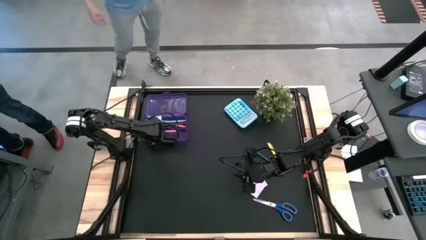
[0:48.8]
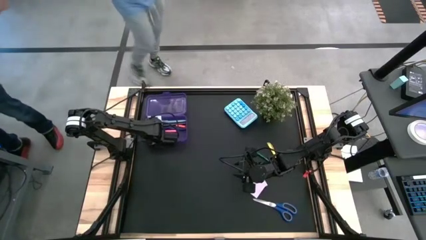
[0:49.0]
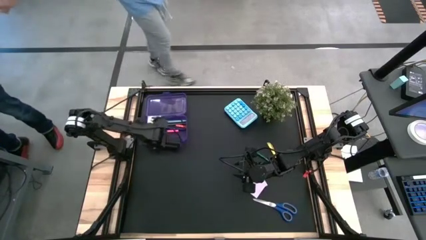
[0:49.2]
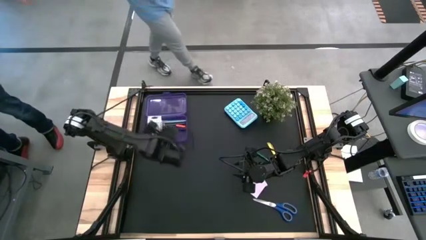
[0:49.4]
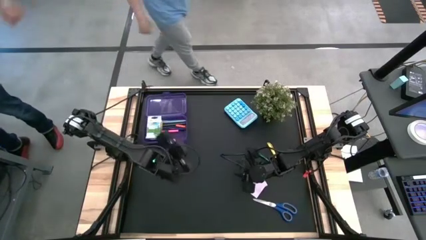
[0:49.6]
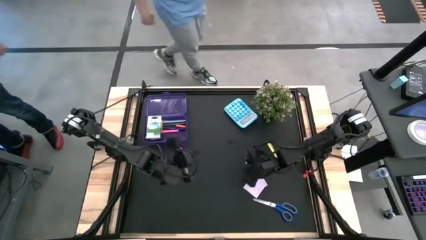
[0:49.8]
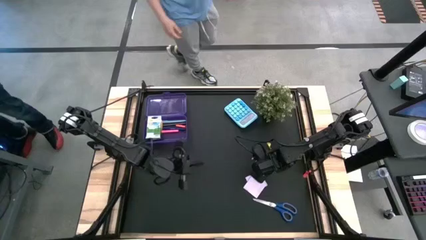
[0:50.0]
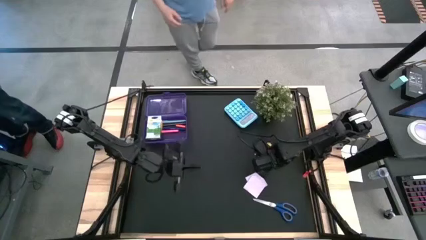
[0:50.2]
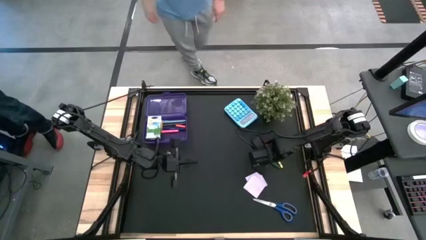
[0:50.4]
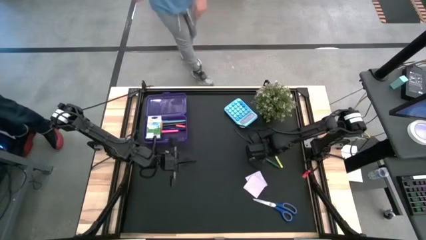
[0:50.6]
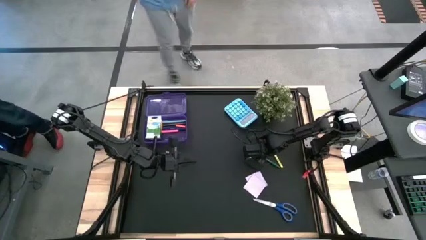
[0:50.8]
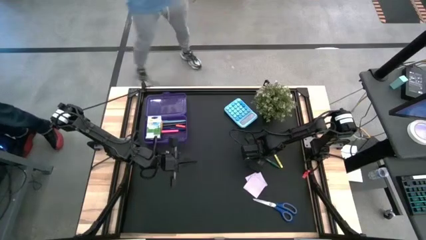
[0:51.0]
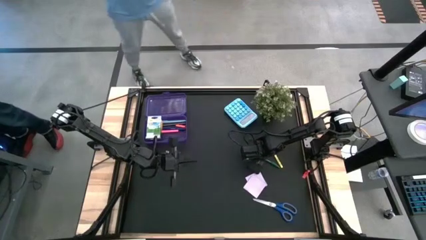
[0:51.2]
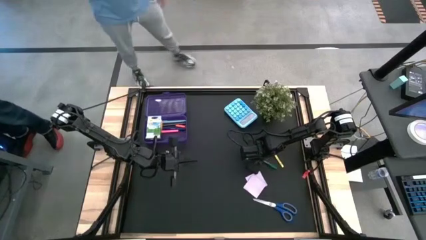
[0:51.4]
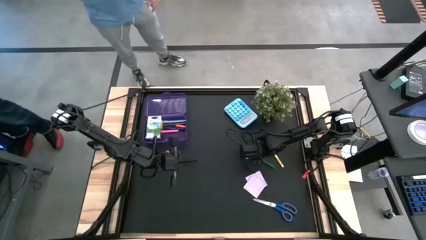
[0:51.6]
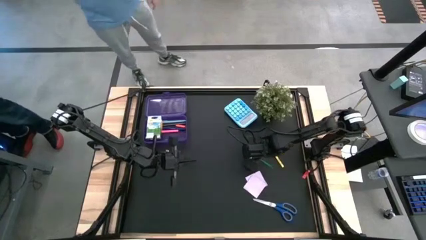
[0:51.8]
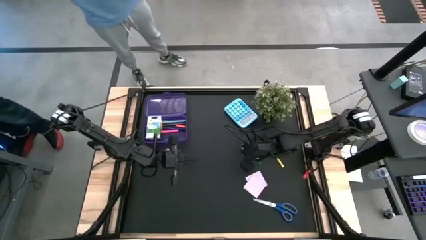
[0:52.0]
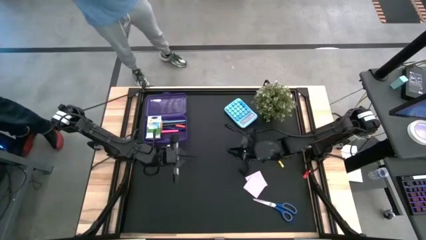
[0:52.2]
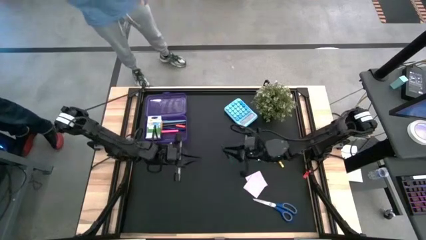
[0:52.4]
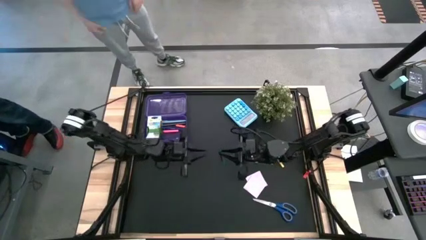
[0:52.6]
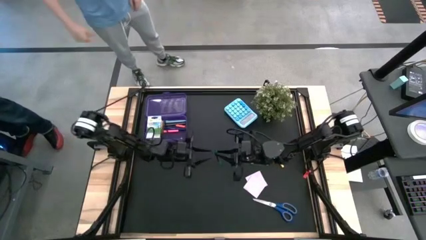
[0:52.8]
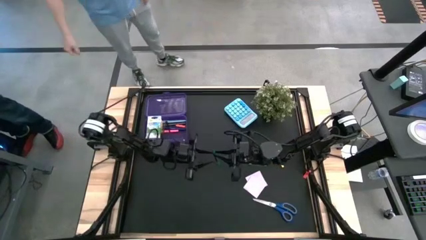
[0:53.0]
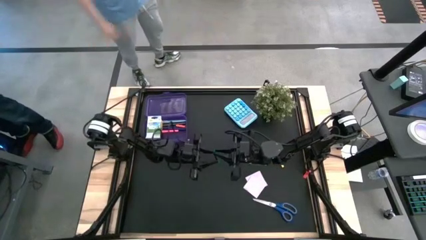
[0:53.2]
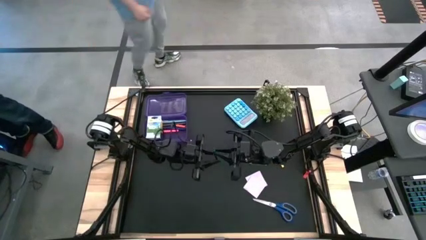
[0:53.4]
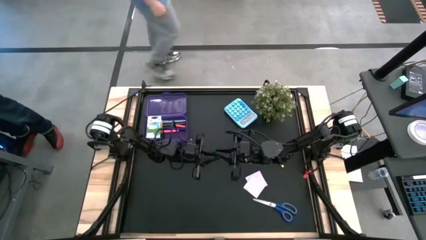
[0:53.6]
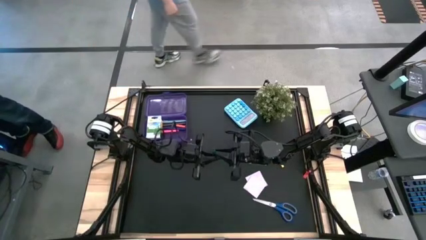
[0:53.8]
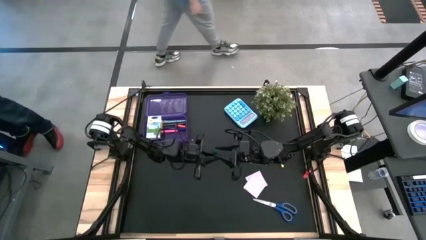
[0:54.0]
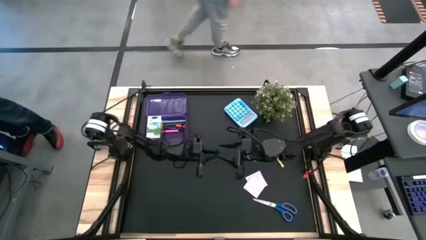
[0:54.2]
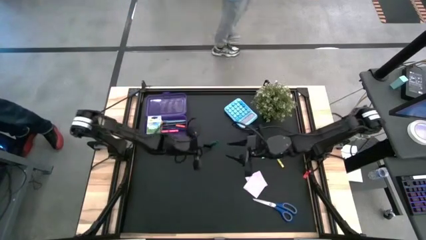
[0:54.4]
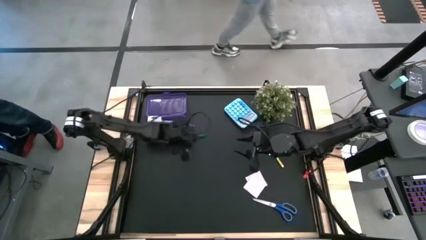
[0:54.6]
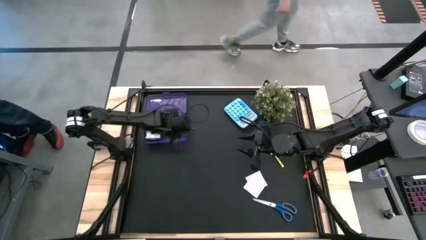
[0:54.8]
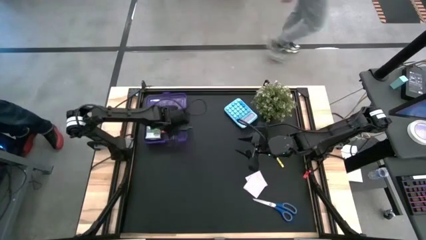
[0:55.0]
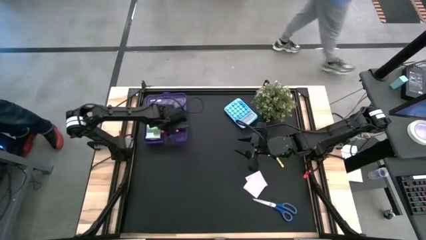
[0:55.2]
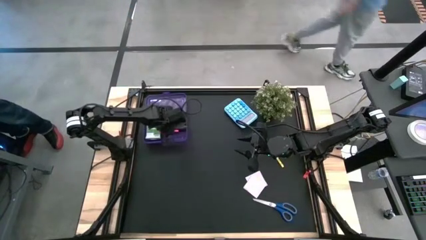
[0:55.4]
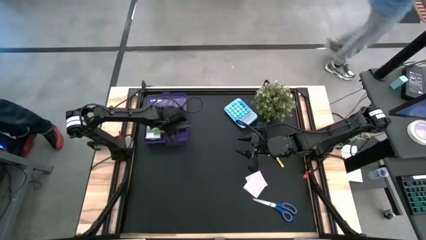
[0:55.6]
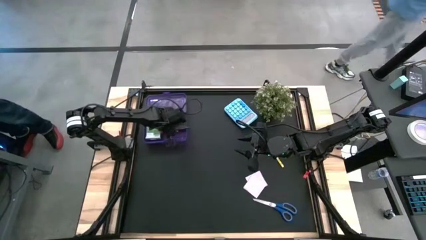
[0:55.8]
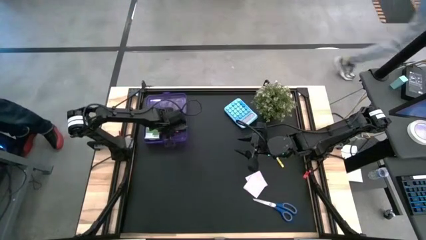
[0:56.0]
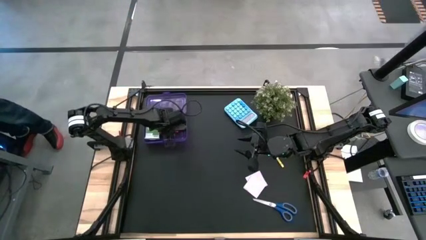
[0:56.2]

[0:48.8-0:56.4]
Task: Pack school essentials
Put the green pen into the purple supply box

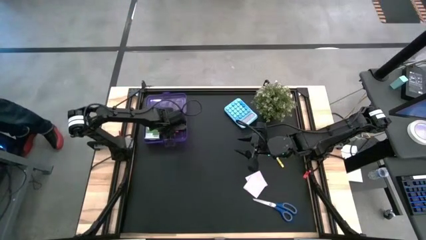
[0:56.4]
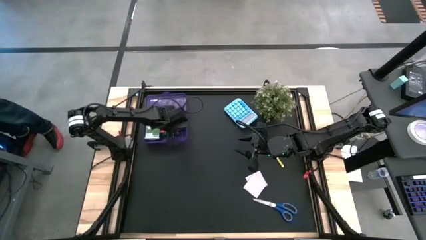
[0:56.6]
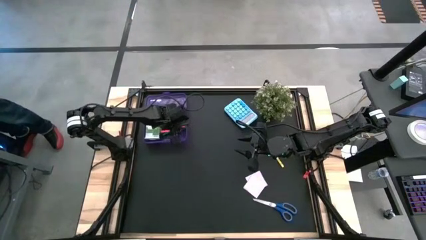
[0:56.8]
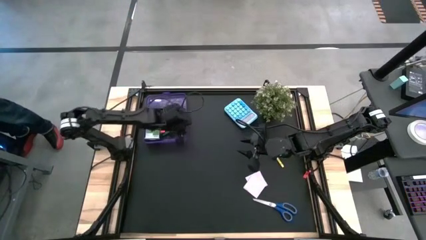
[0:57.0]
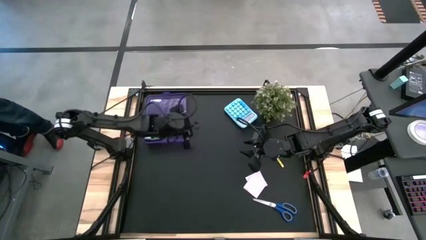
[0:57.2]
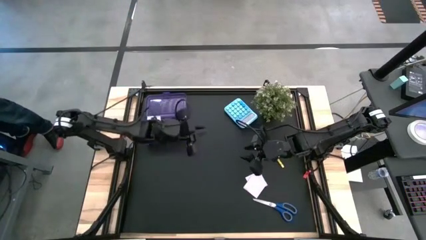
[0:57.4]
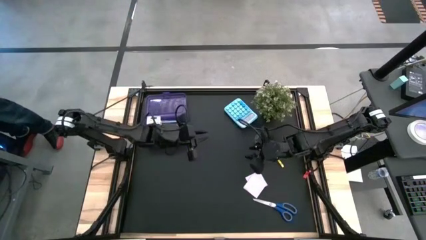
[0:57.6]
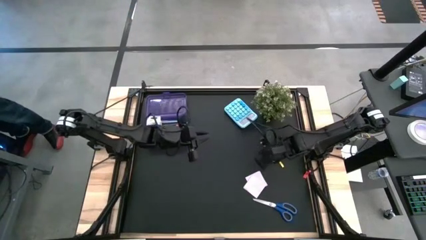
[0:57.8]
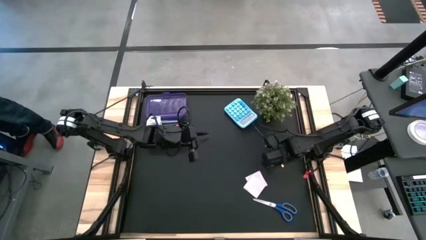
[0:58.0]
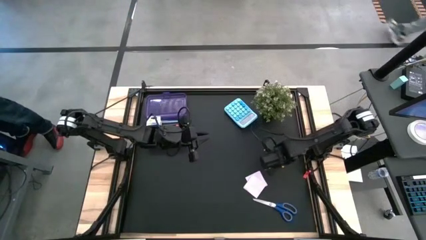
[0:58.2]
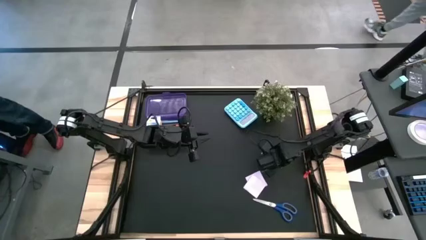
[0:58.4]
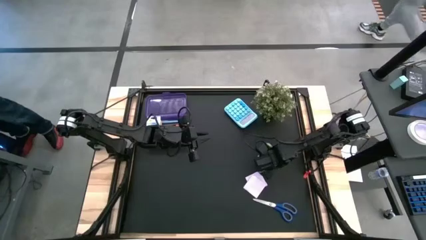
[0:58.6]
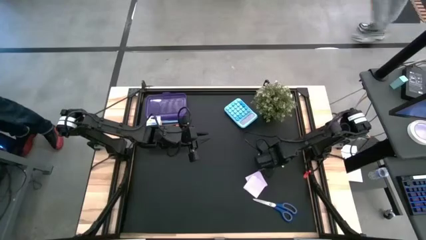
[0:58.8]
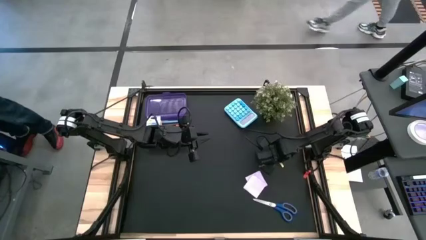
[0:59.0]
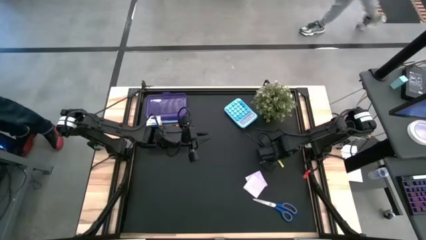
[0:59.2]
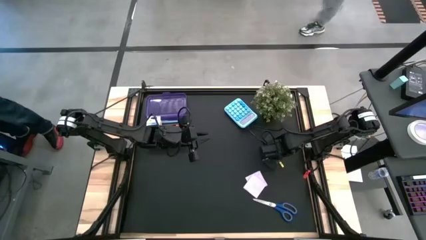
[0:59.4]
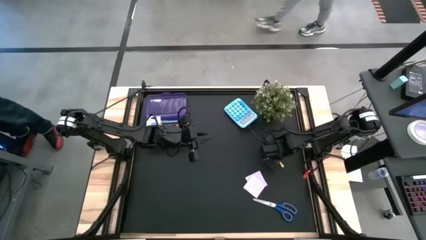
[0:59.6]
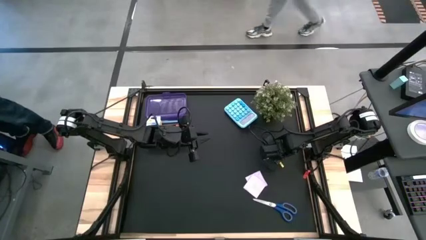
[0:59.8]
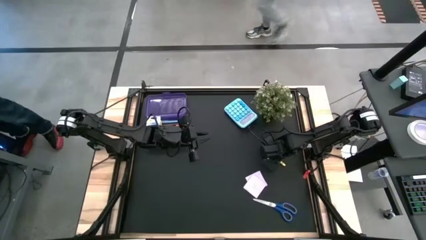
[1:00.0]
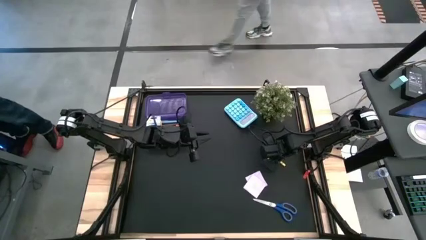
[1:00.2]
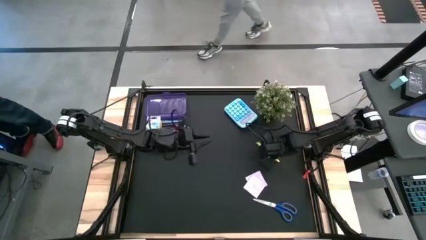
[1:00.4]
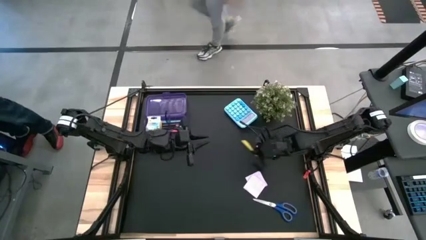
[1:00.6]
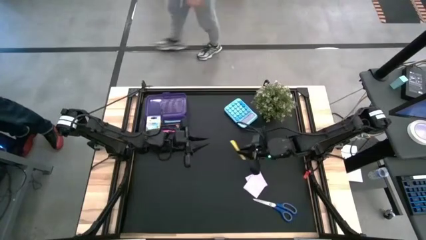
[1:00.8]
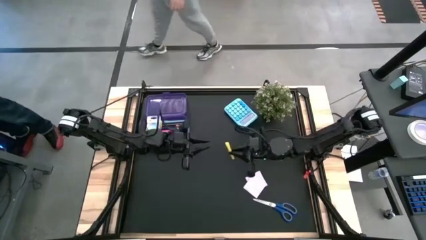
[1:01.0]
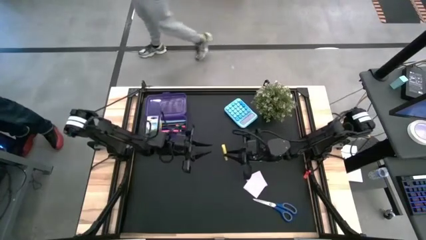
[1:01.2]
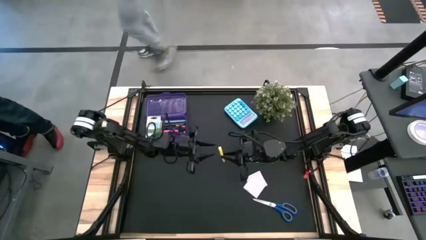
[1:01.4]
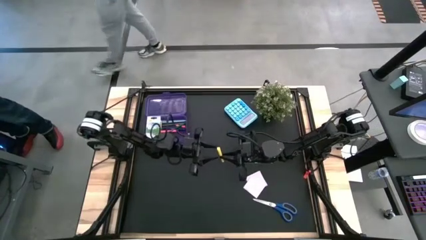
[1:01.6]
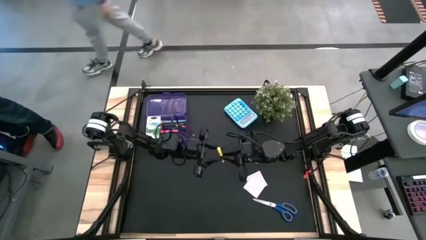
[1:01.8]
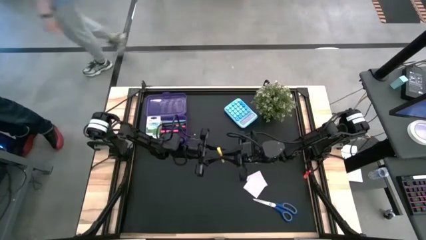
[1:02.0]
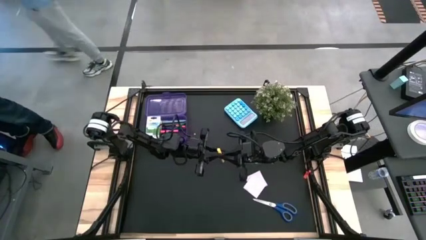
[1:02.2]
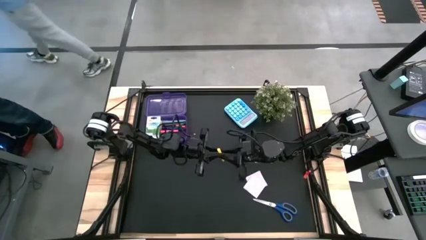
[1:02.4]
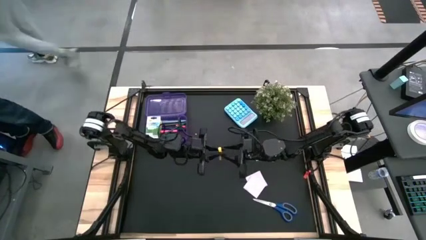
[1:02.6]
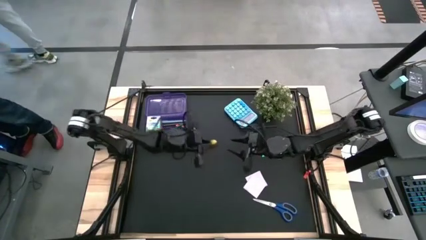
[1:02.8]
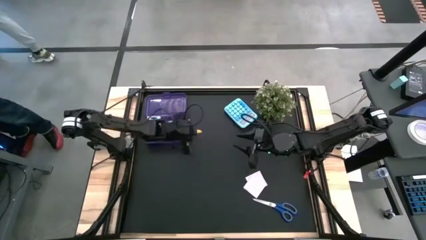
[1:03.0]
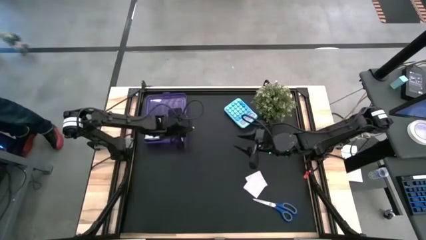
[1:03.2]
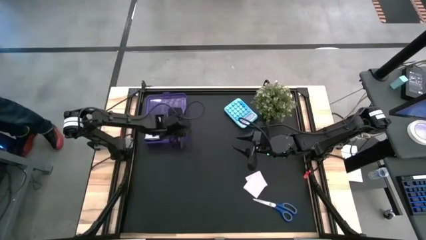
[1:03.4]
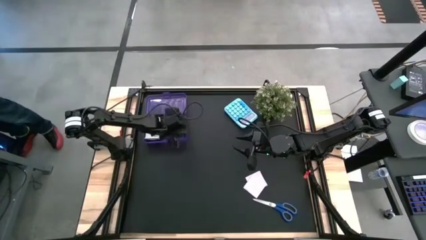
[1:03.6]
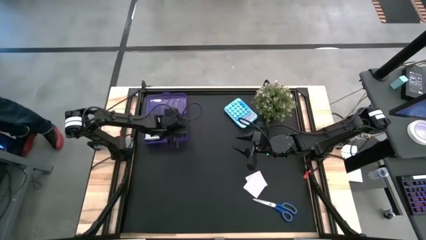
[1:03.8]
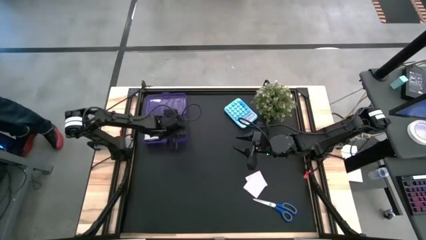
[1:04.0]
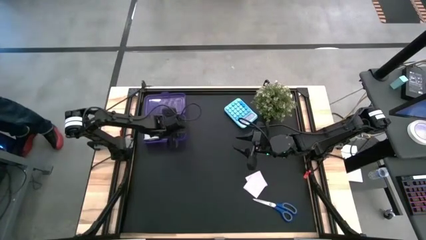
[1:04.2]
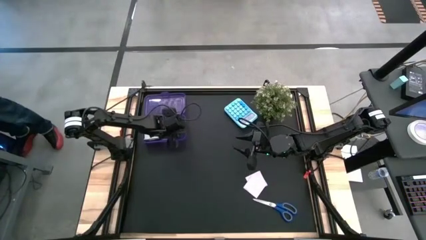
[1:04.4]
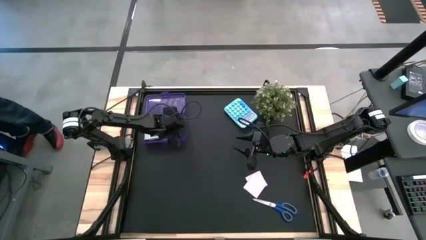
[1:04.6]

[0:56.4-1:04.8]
Put the yellow pen into the purple supply box

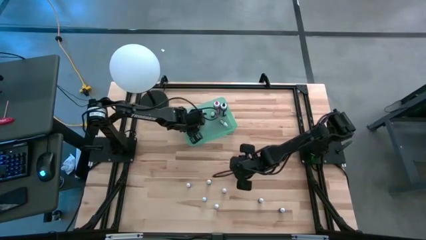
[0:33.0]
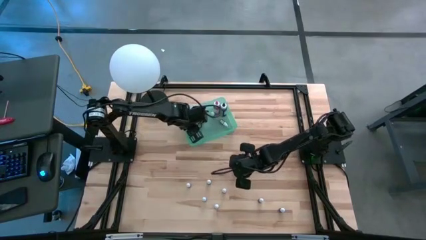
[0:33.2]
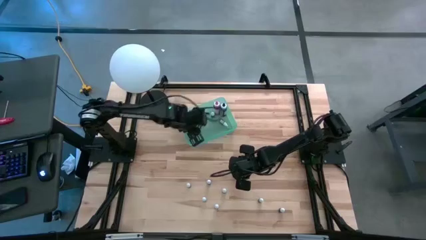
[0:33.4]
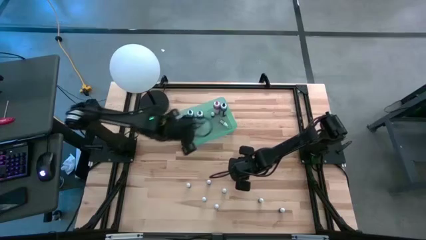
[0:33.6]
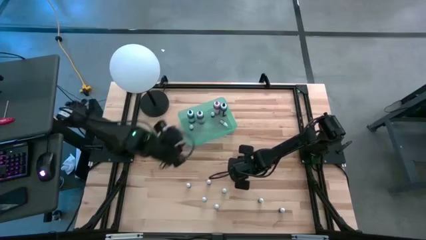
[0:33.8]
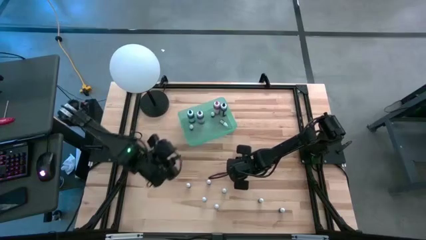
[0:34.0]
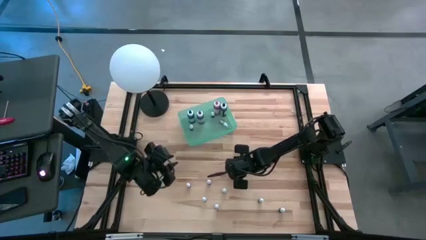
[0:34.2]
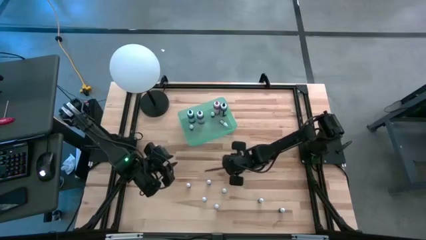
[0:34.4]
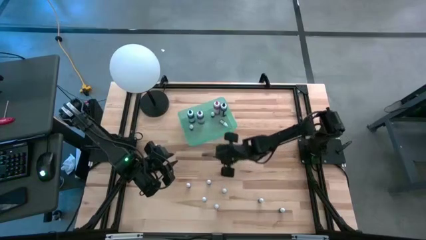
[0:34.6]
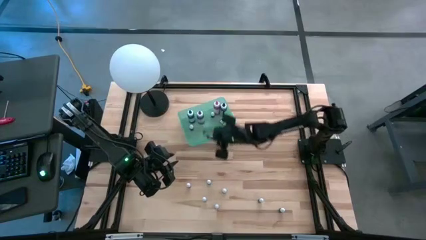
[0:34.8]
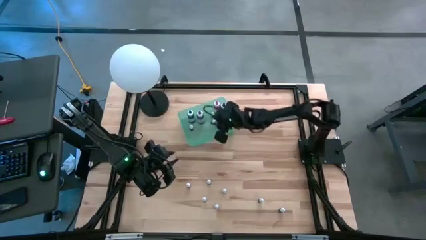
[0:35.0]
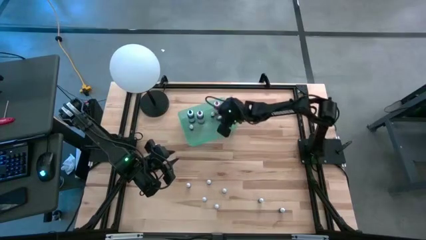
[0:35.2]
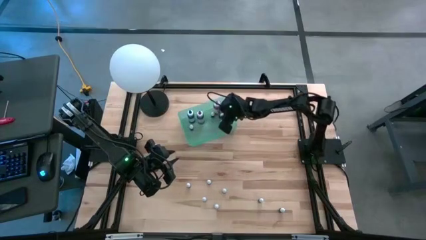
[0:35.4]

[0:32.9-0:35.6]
Task: Pick & Place food coloring
Put the top small red bottle into the blue bin
